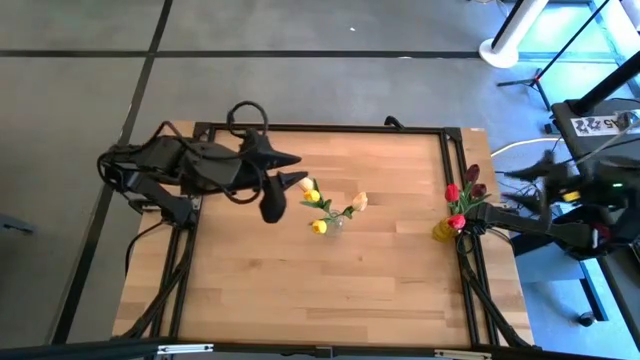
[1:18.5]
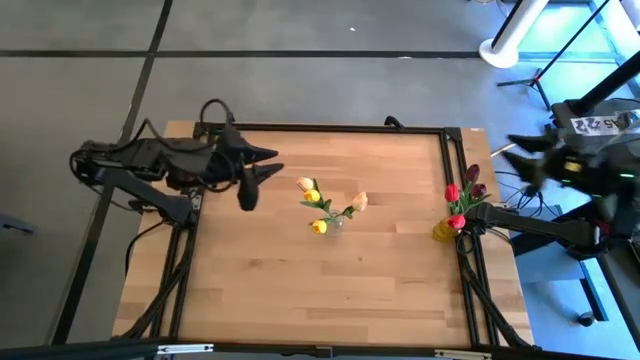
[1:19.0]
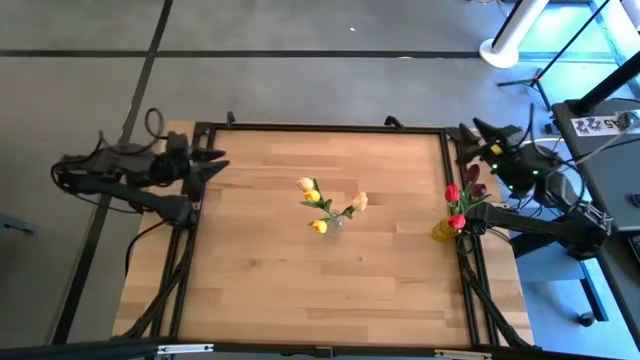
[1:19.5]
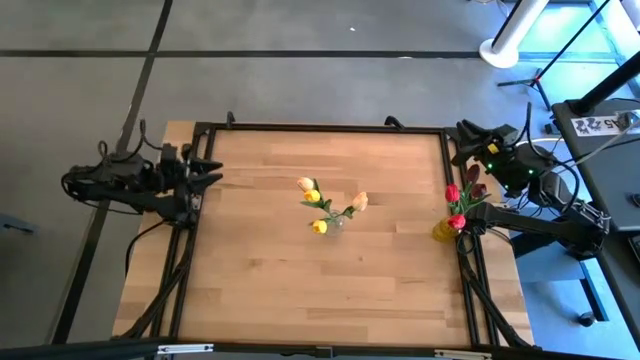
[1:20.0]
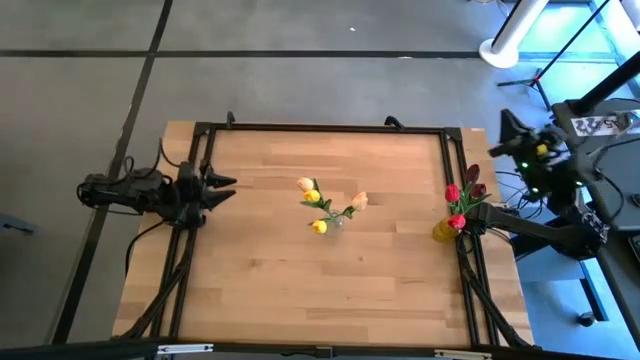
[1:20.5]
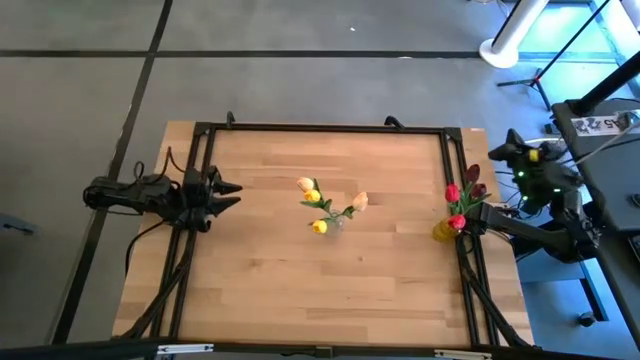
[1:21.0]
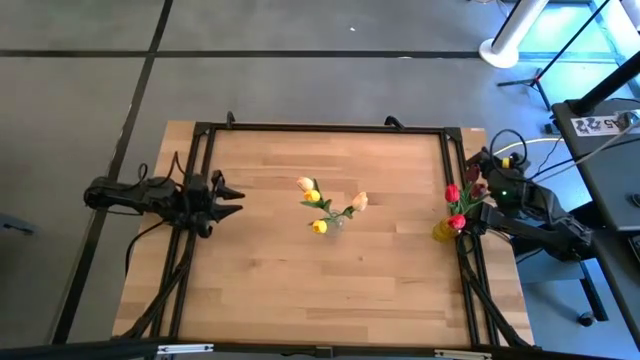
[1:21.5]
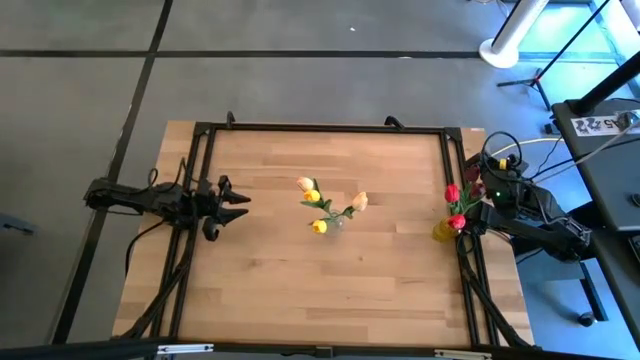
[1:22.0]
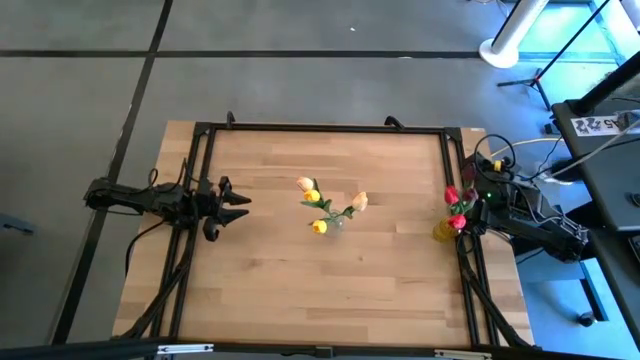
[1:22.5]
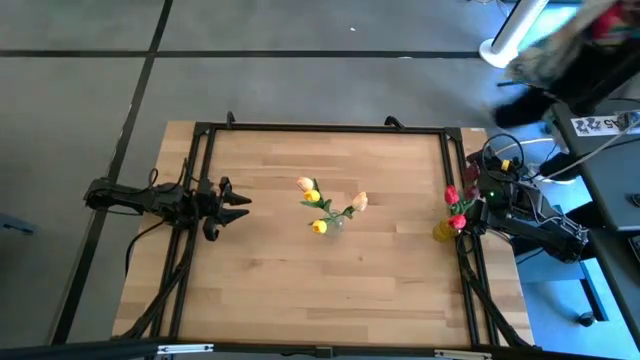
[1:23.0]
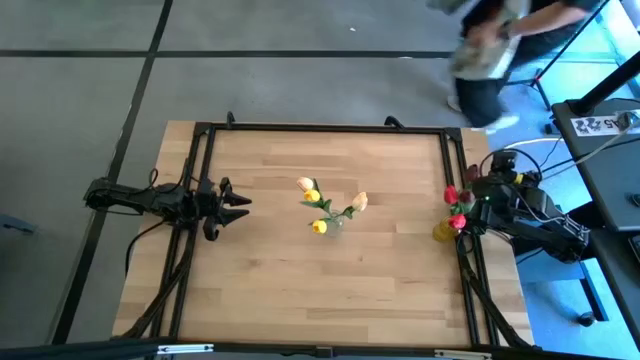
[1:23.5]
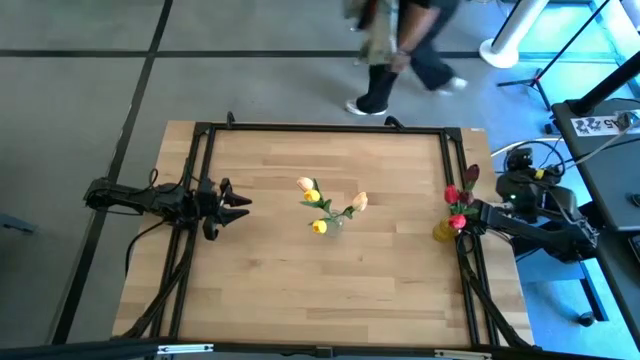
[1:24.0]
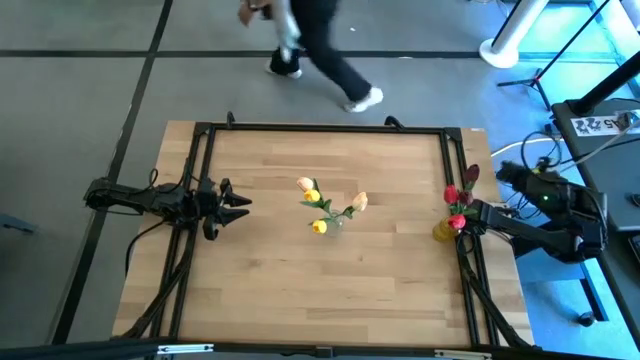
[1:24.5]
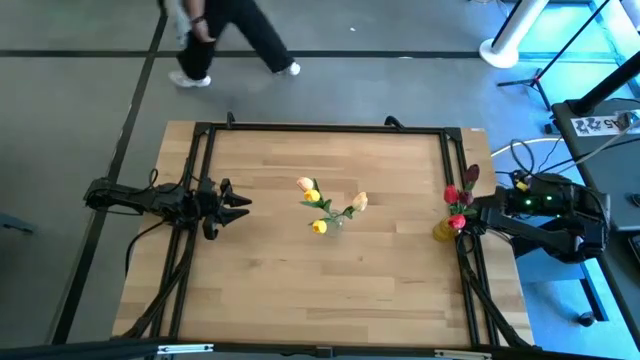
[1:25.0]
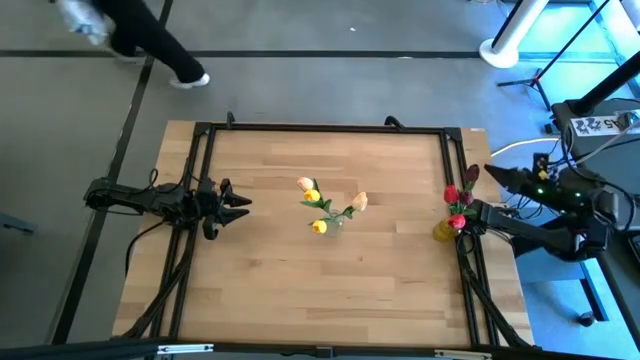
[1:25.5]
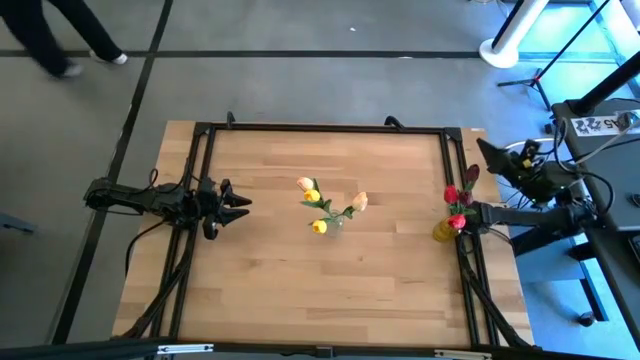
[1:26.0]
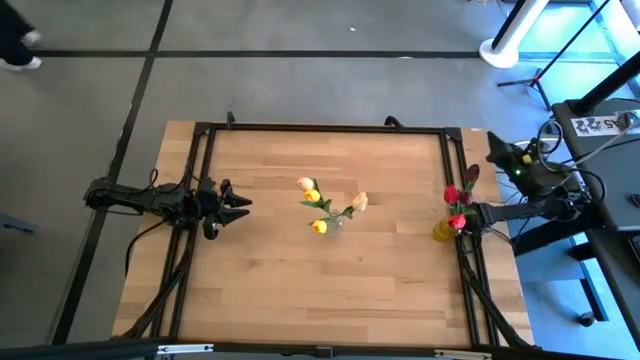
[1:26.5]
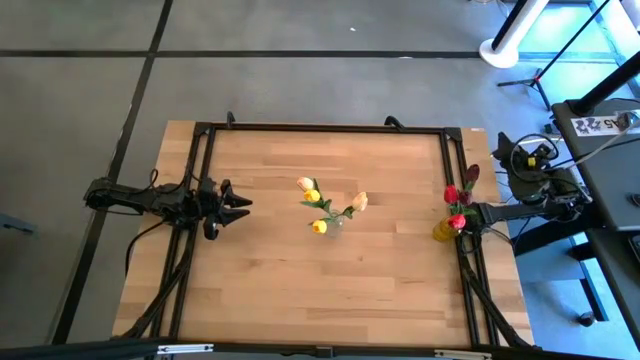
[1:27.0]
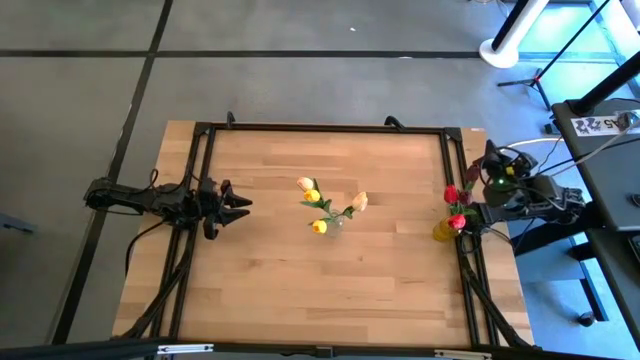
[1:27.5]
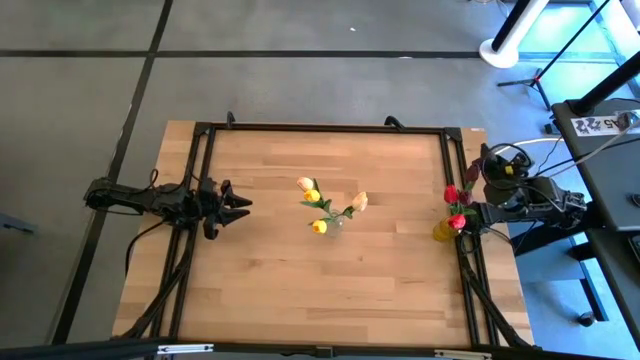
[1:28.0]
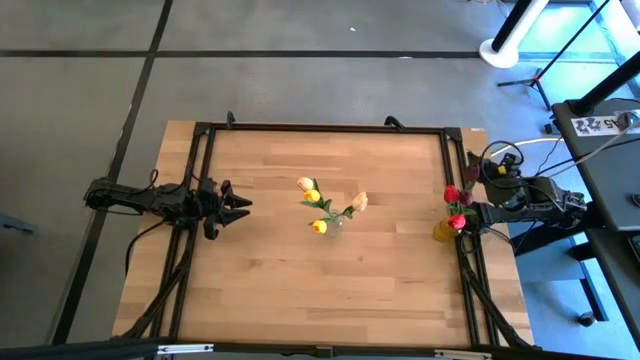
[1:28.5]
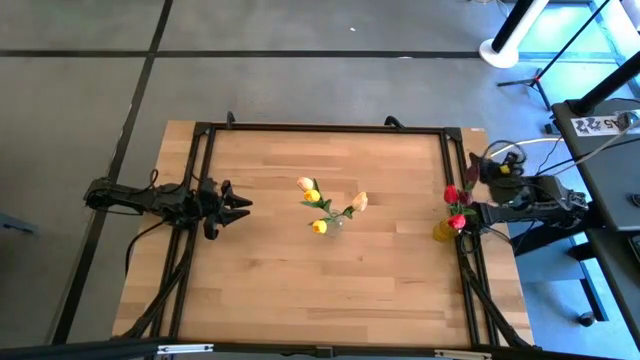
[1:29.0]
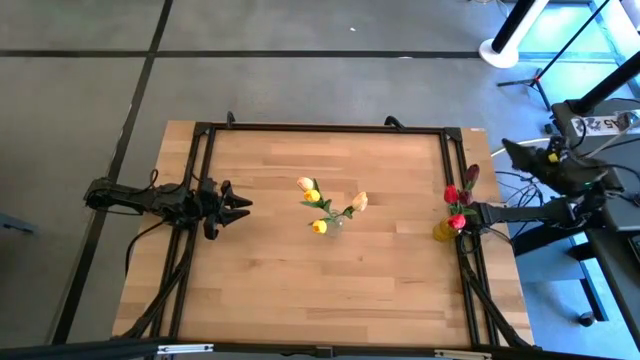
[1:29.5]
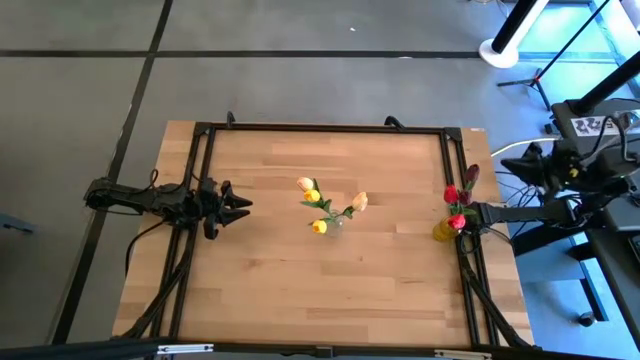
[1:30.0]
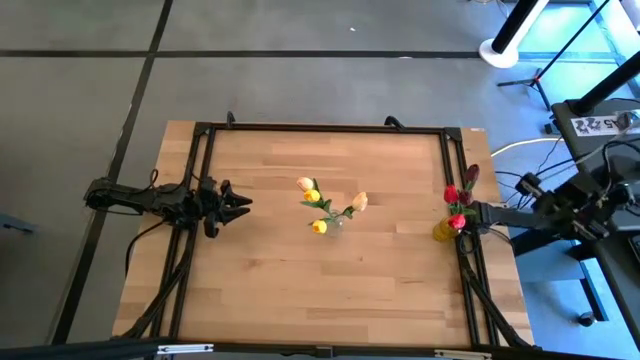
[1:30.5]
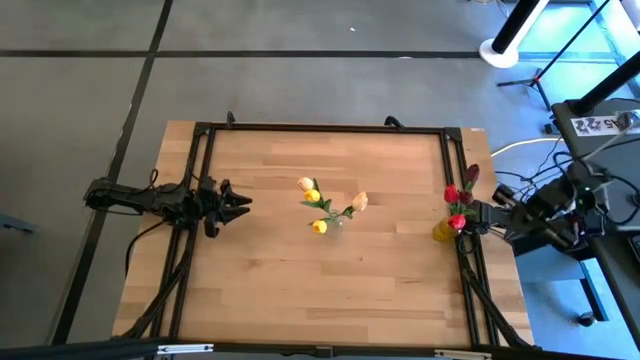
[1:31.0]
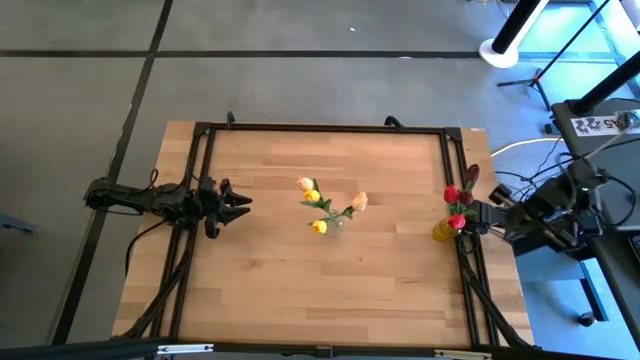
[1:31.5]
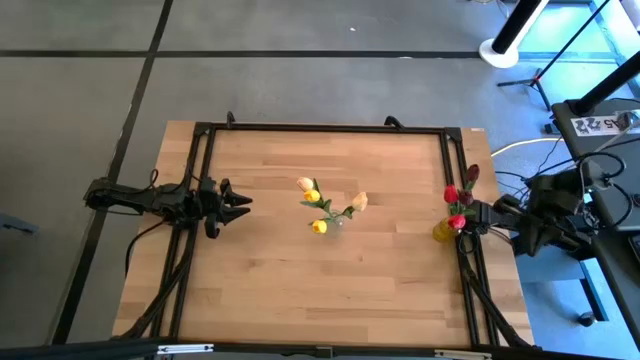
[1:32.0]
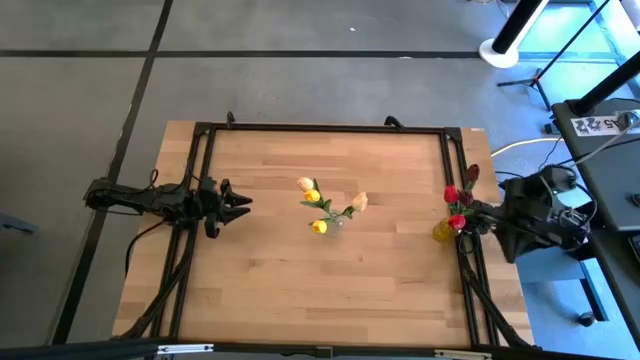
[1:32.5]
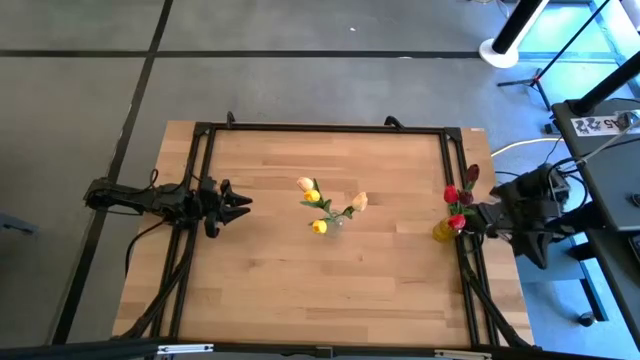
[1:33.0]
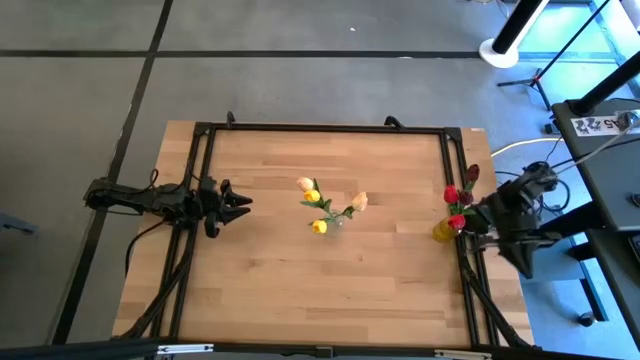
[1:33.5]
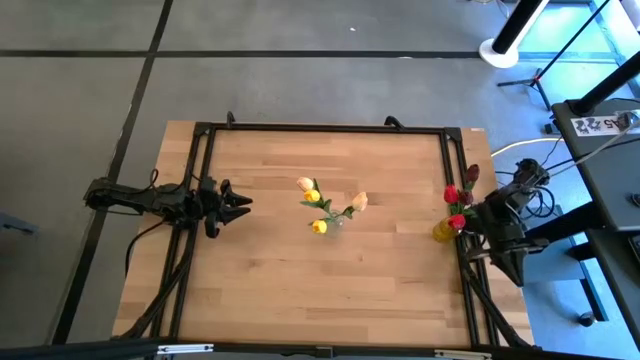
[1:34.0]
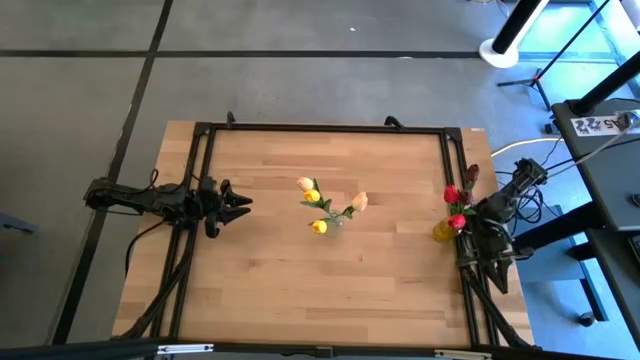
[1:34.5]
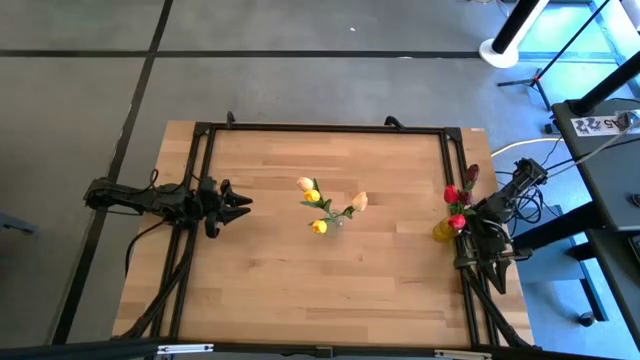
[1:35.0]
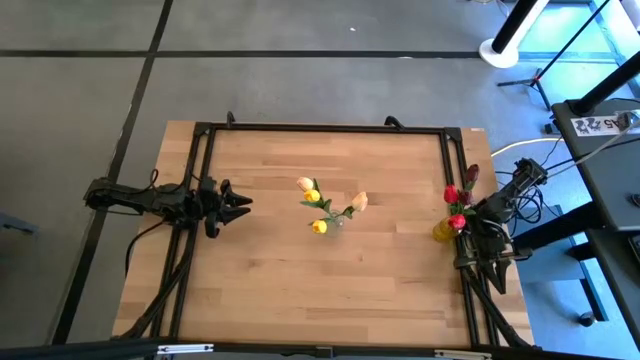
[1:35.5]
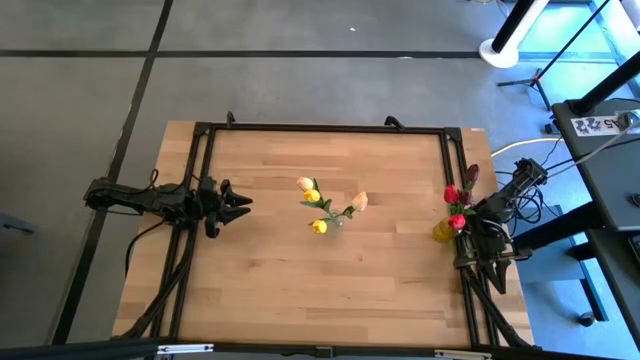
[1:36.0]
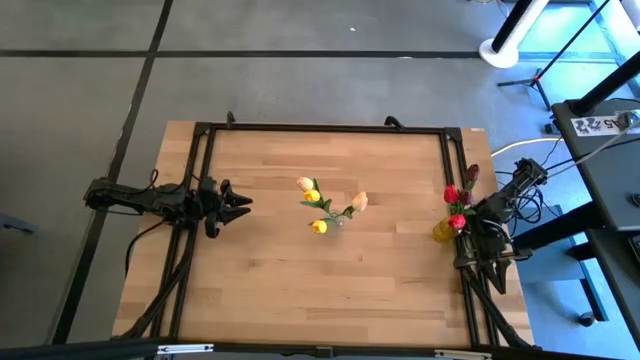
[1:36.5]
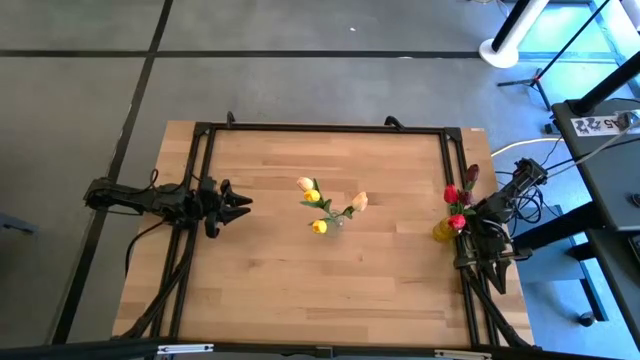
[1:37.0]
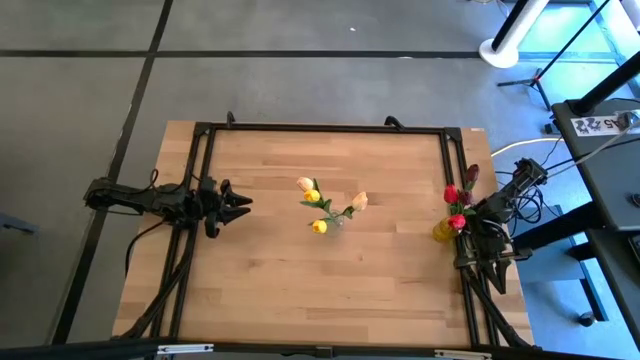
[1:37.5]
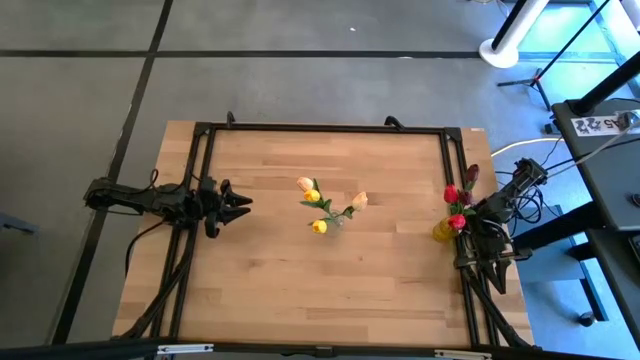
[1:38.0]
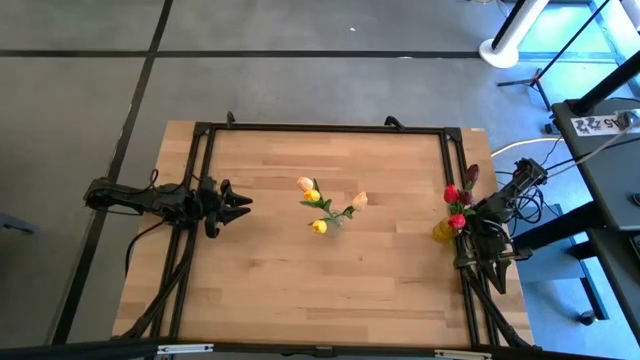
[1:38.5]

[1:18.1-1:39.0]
Task: Sort flowers into vase by color
Return to Home Position

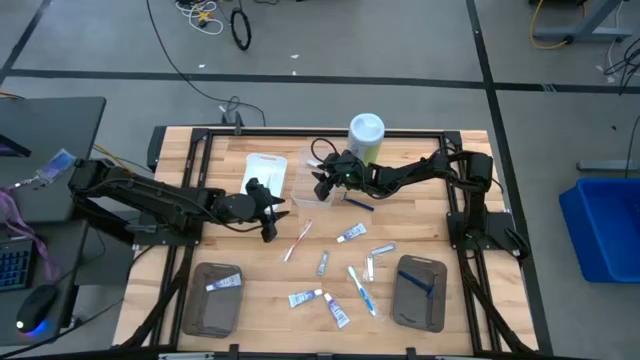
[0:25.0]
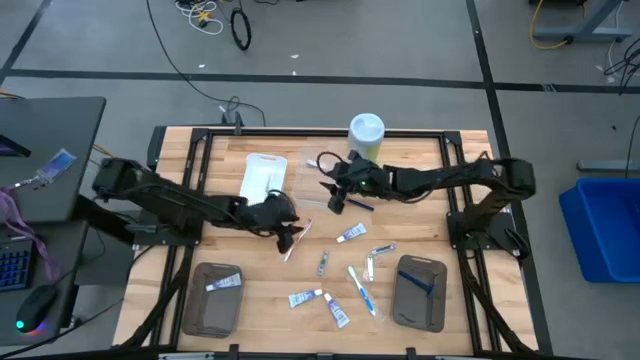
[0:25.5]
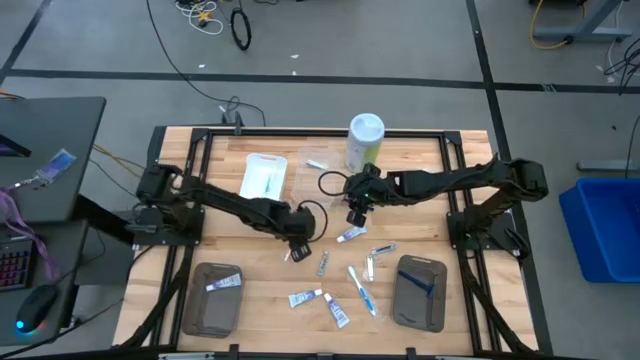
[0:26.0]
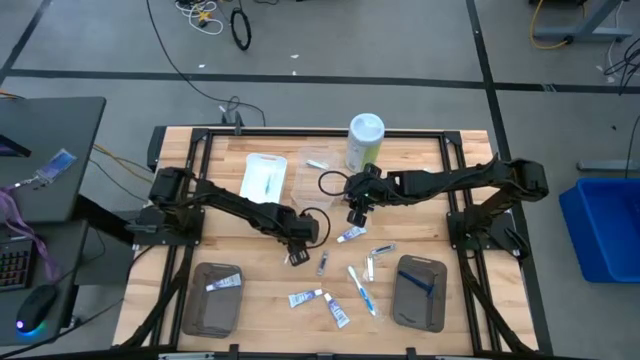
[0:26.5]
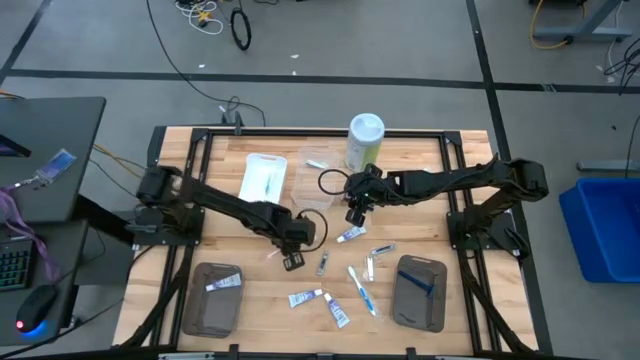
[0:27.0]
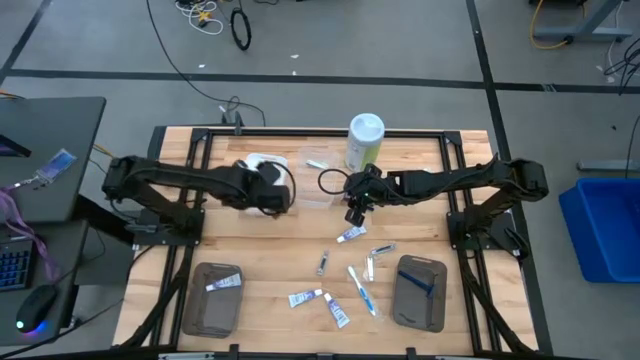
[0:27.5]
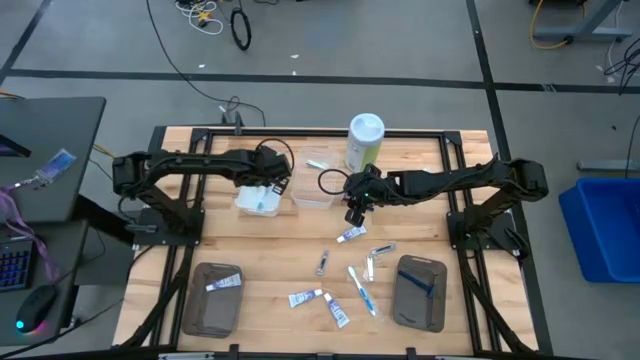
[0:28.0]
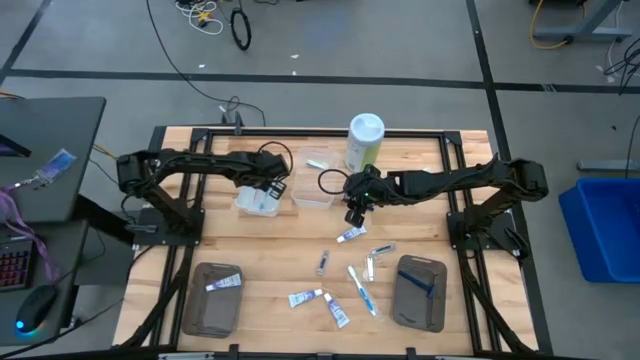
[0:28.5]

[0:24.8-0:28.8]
Task: Pick & Place Travel size toiletries
Put the orange and white toothbrush into the white bin
